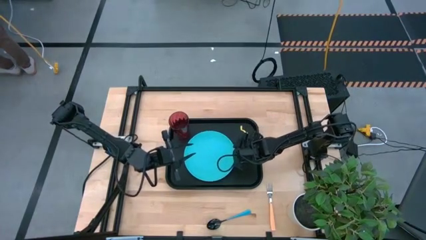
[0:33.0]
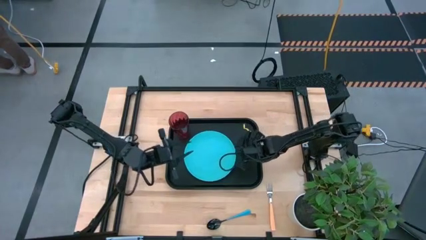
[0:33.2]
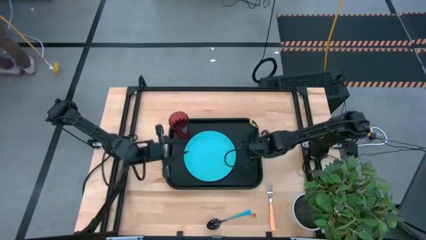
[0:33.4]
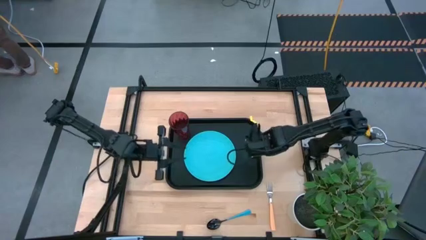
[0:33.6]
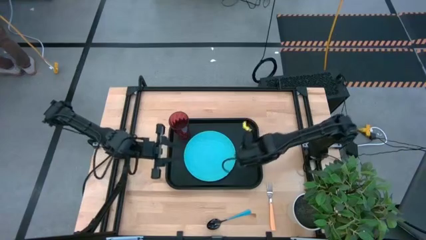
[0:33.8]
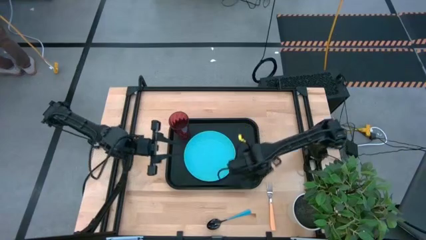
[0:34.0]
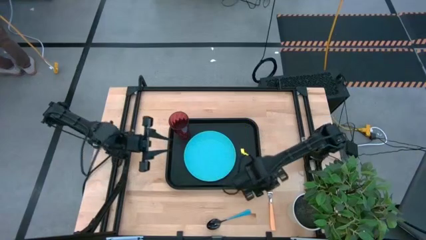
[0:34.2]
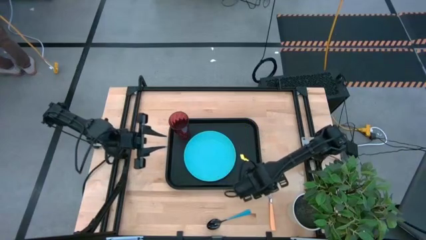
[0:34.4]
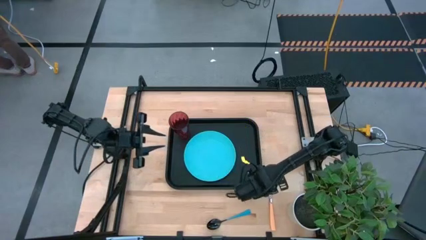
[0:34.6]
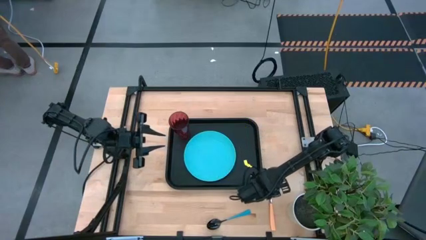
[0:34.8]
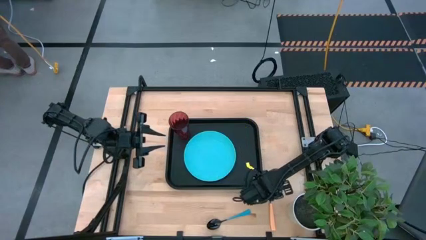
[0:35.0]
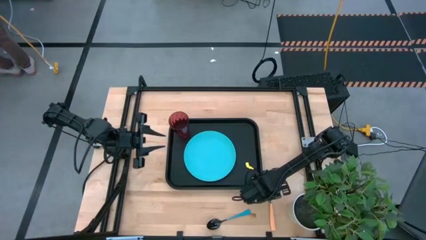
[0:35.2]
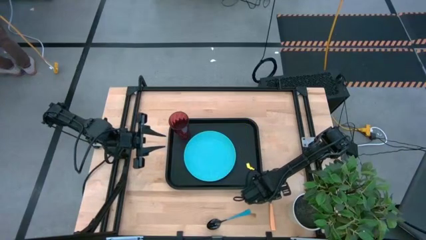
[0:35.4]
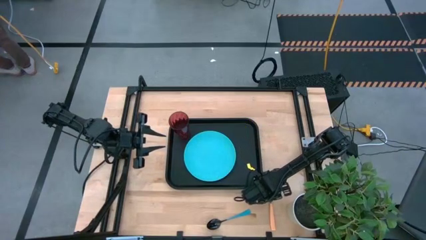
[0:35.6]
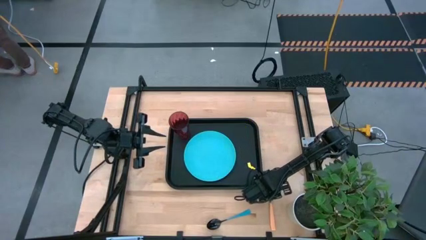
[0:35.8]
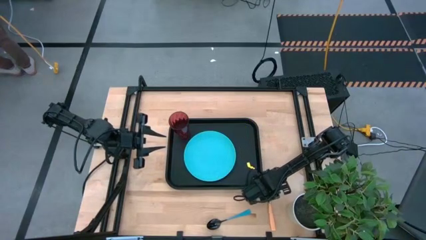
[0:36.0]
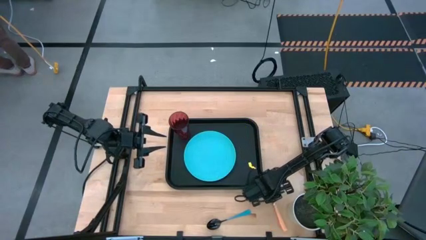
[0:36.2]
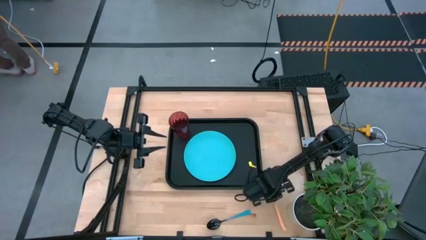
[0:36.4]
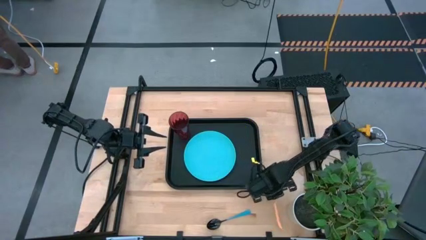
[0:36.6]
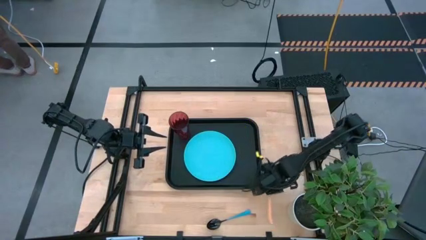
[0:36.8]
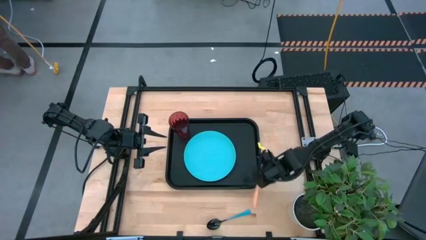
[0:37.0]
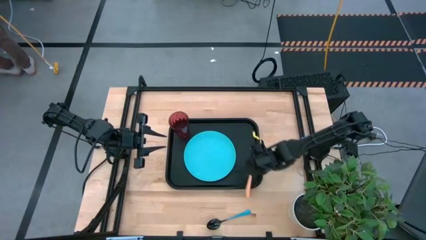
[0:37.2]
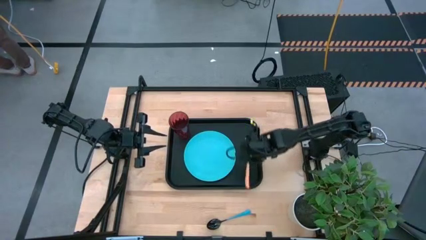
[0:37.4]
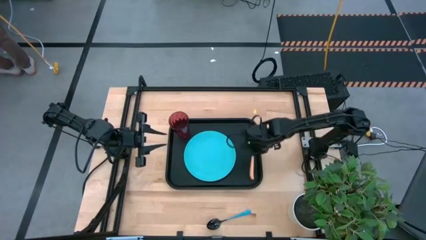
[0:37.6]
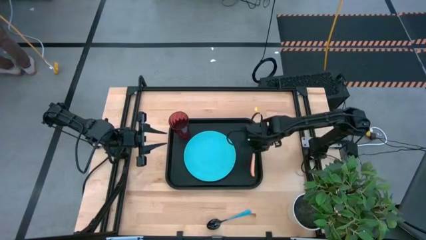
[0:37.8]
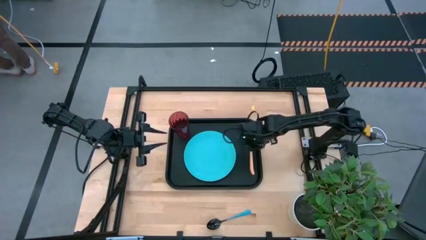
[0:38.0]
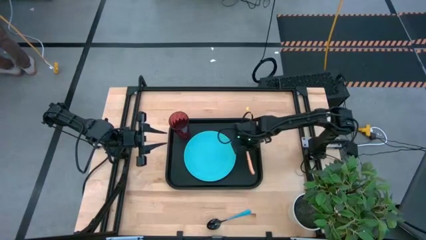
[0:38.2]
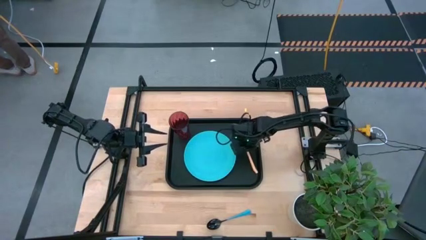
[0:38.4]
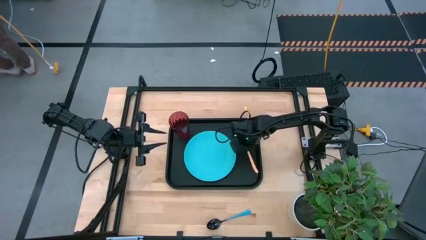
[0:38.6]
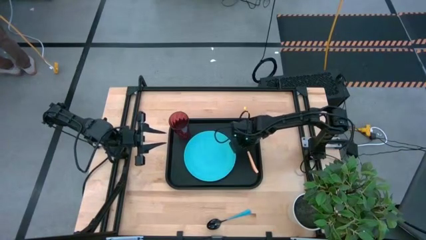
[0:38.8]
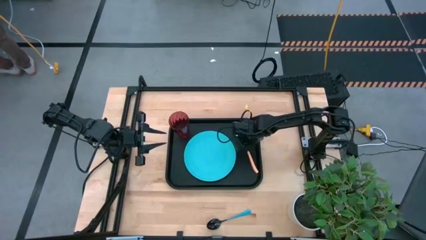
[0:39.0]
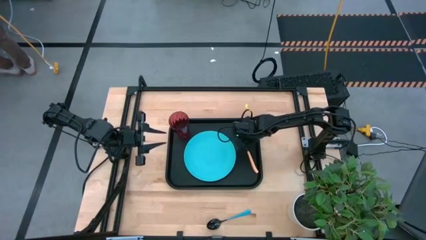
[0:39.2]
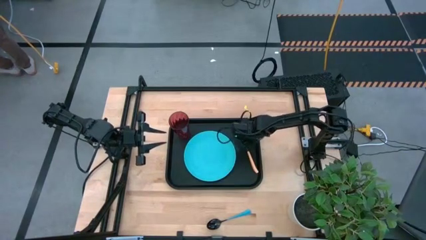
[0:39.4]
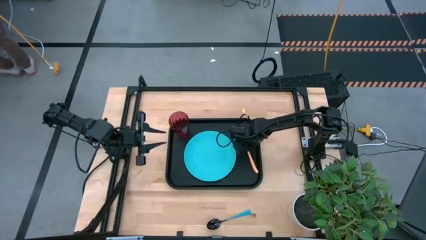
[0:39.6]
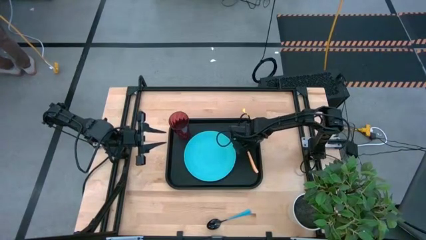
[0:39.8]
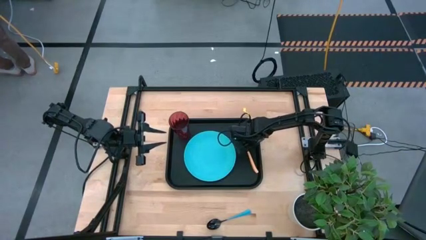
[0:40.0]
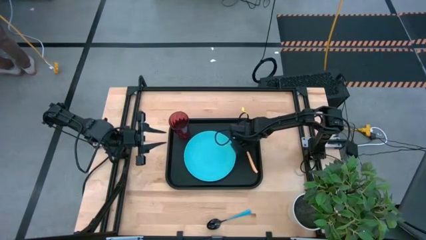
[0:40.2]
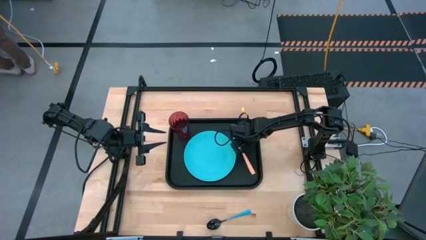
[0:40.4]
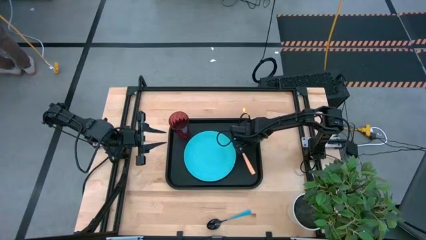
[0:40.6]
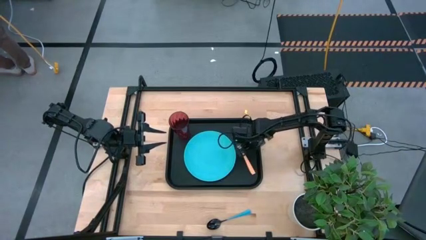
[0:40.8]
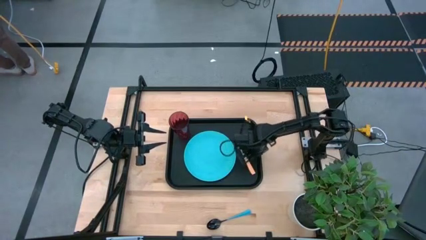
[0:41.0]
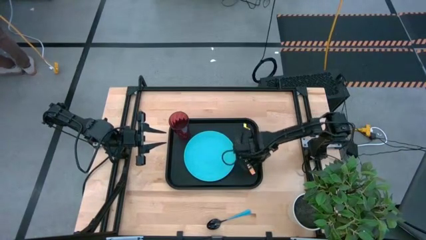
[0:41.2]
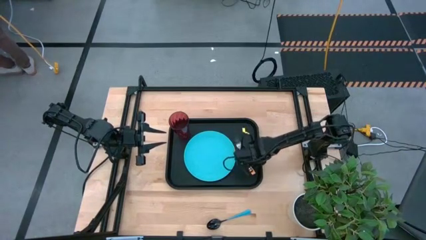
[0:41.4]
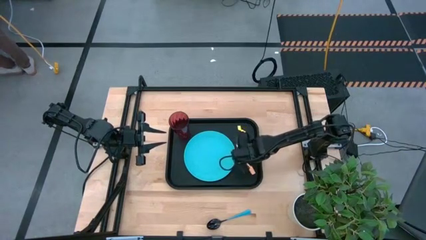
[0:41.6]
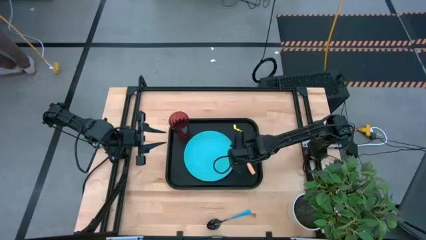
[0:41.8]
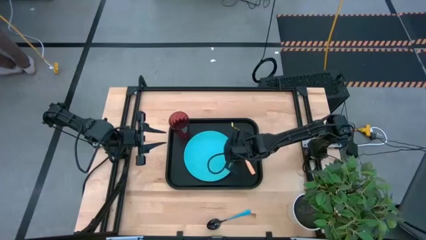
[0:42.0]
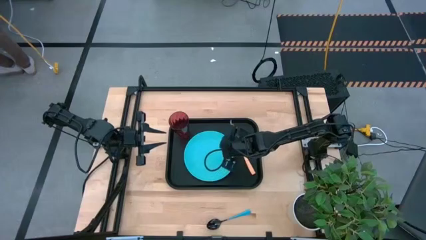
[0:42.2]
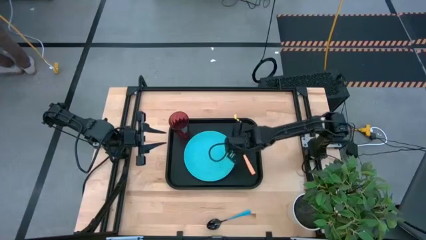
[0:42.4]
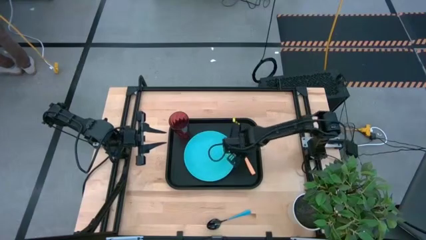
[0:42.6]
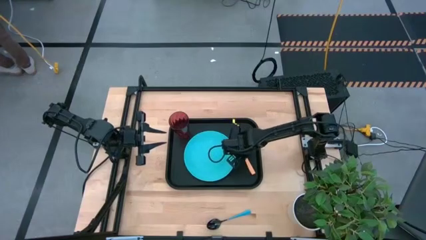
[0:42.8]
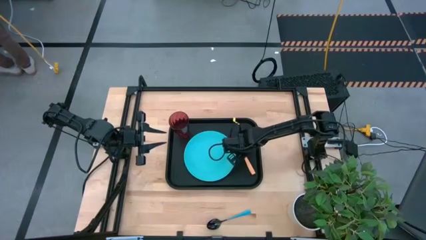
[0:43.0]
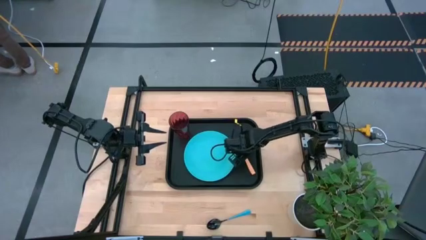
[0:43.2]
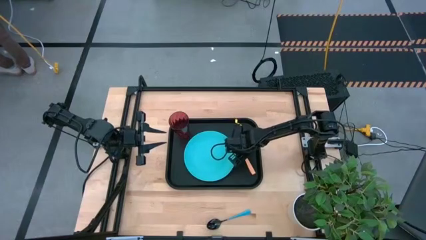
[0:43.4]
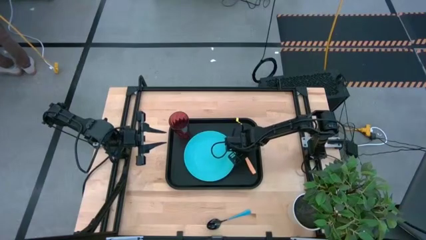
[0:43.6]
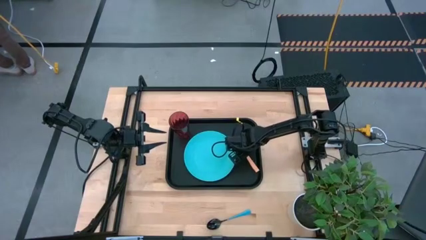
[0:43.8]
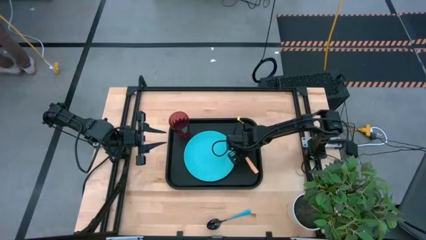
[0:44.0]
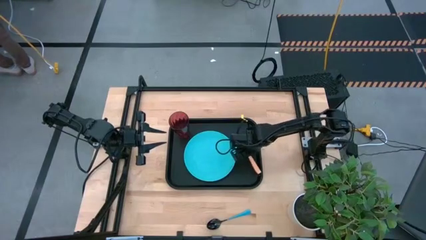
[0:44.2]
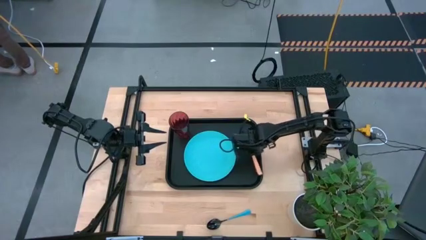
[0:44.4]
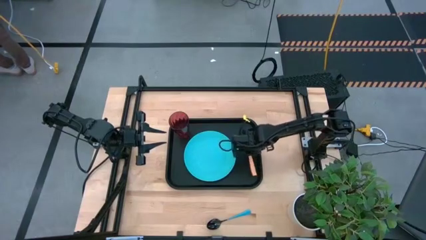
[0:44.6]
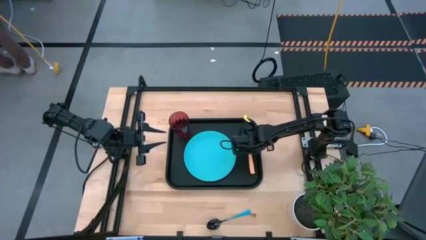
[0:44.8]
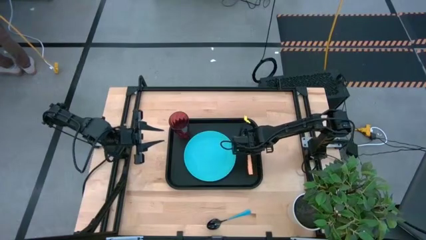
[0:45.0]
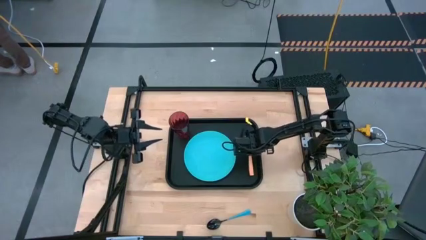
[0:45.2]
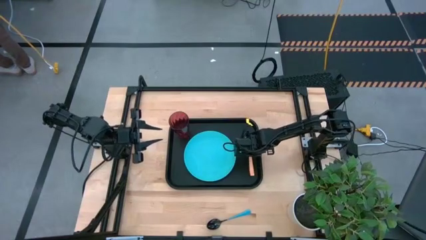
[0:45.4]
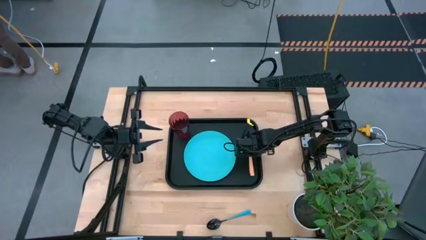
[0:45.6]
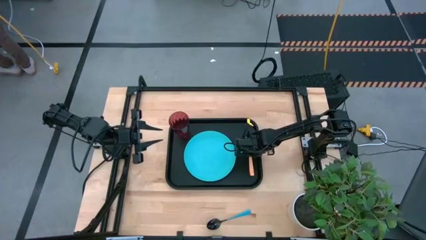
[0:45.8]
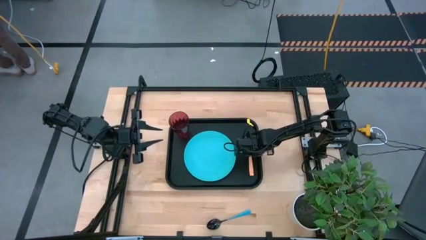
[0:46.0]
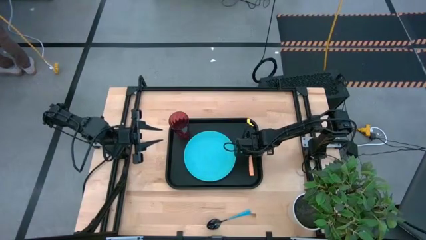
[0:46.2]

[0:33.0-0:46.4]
Task: Pick and place plate/cup/fork/spoon on tray
Put the fork on the black food tray
